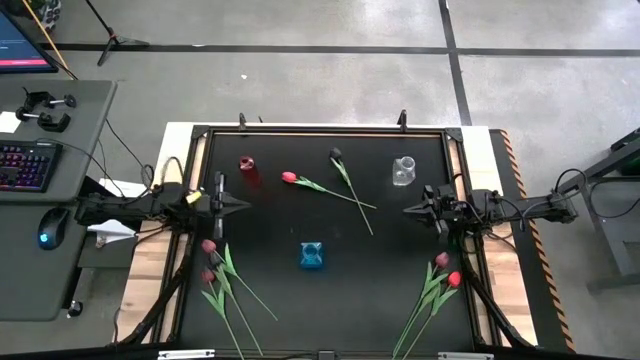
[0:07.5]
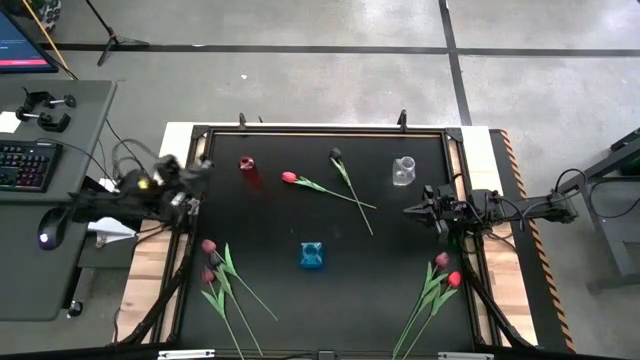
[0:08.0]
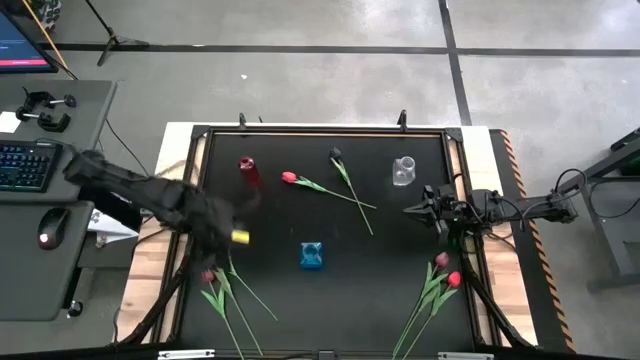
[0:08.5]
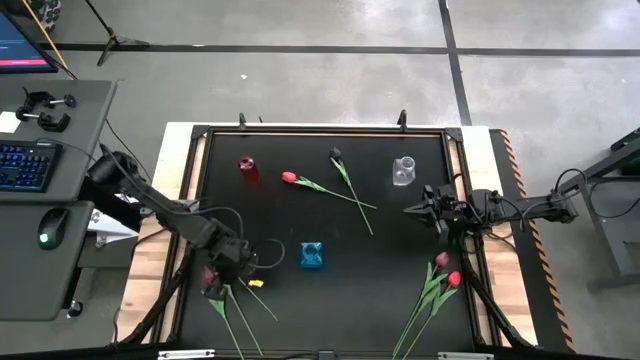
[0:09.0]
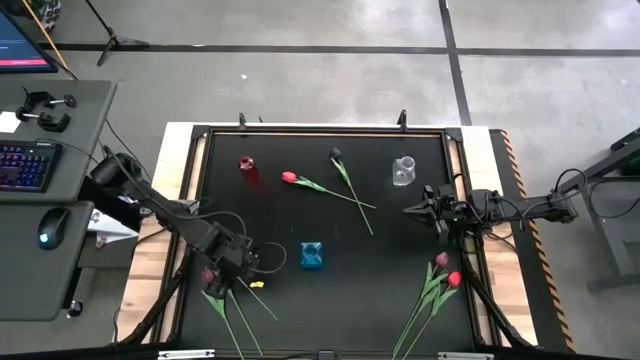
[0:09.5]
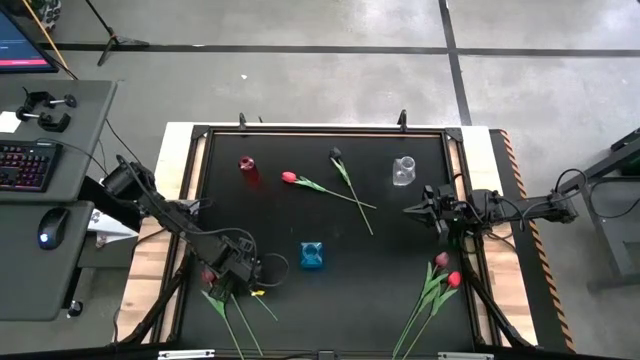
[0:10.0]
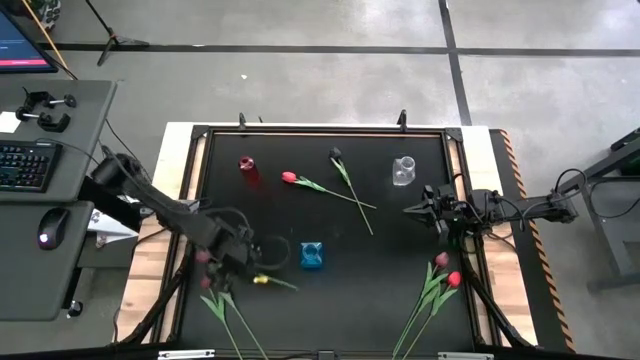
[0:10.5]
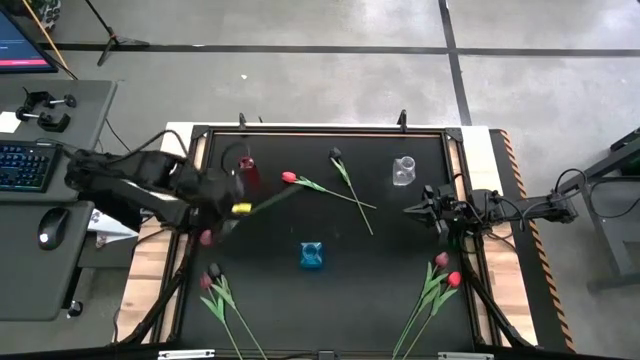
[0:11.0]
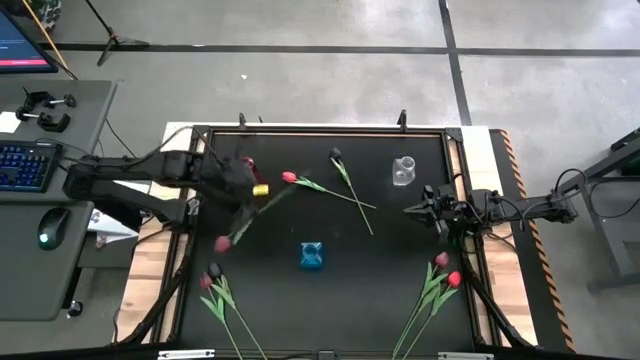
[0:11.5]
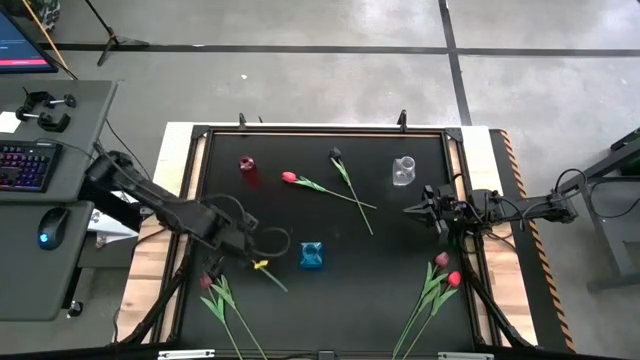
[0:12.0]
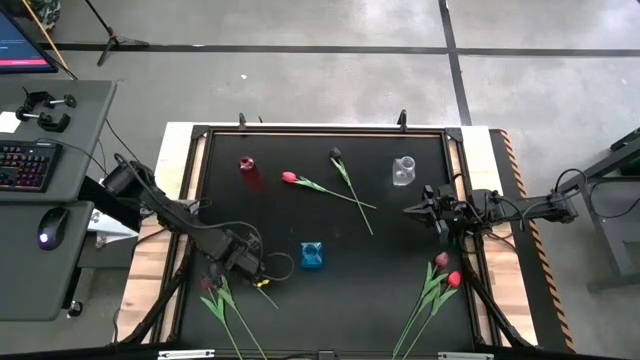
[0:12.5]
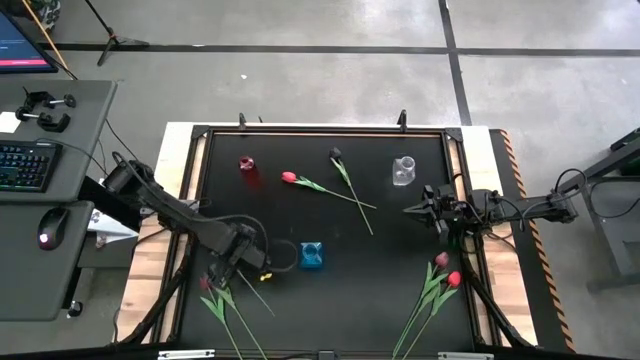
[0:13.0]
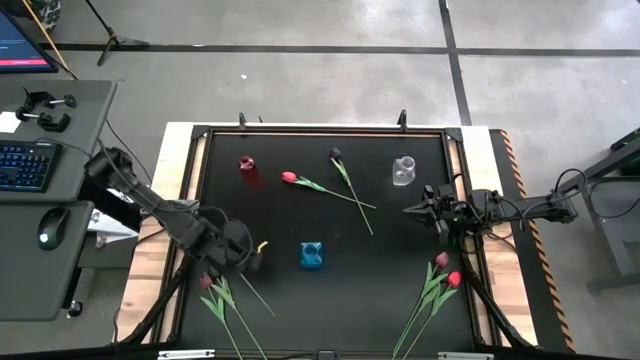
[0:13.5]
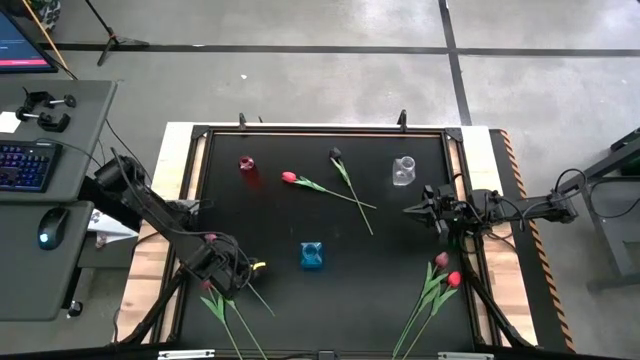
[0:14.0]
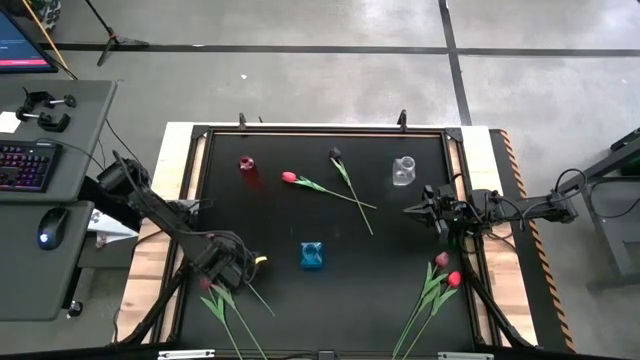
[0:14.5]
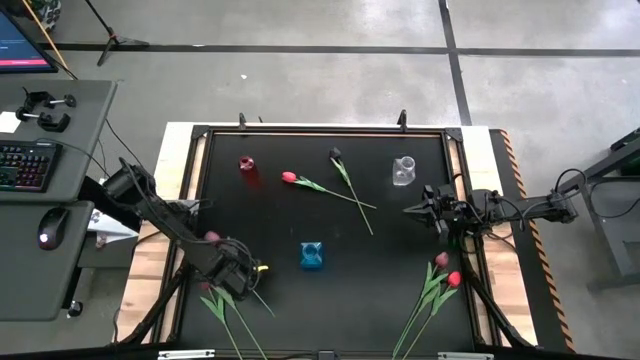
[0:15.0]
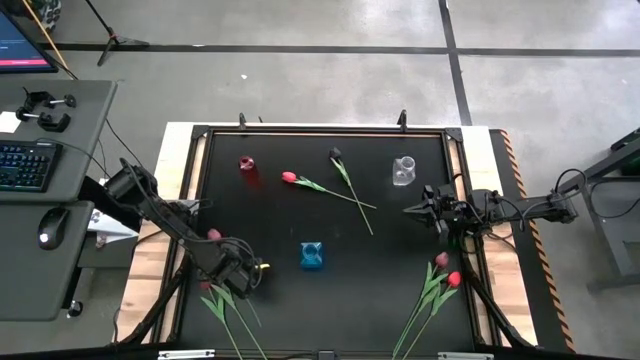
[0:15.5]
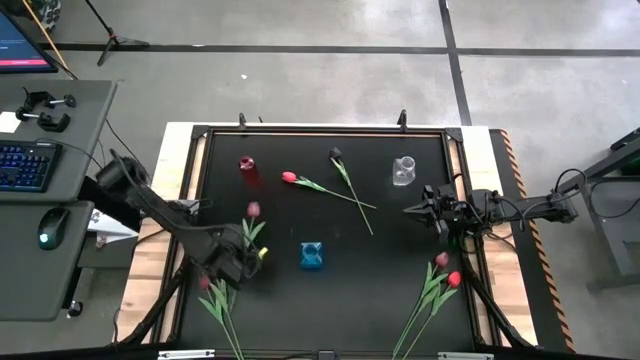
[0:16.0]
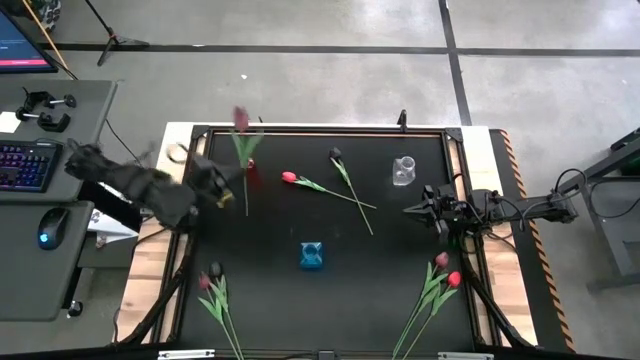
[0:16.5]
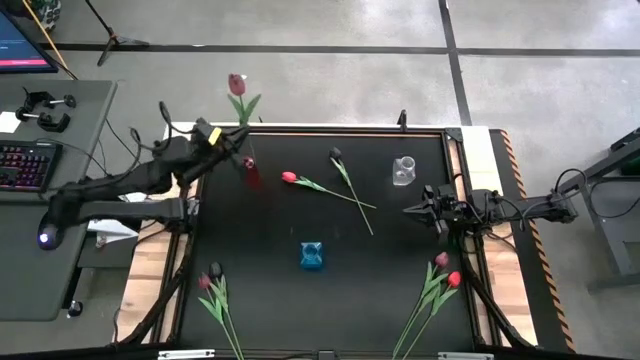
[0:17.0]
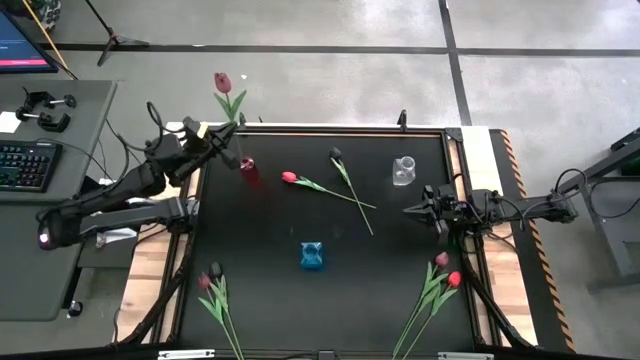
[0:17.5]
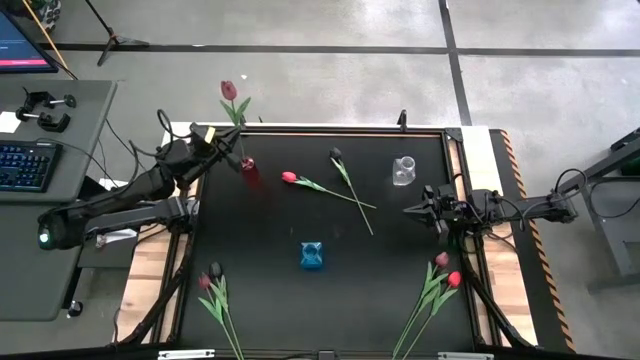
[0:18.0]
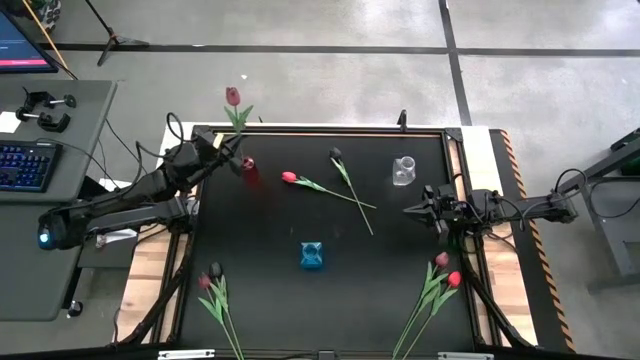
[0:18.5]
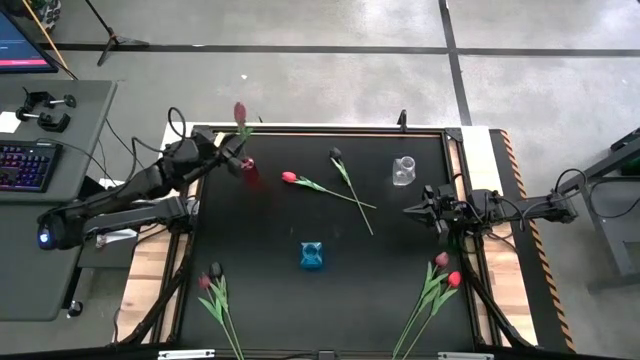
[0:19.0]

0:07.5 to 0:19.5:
Task: Sort flowers into vase by color
Put the top left dark red flower into the red vase

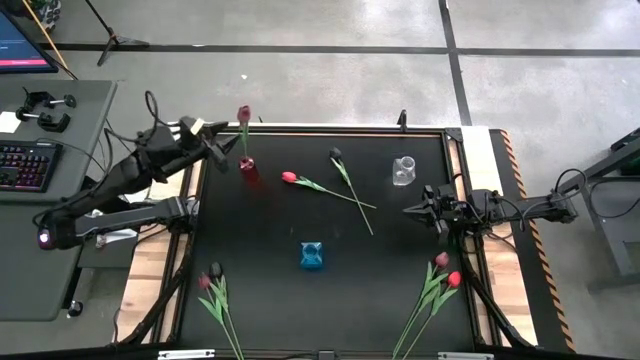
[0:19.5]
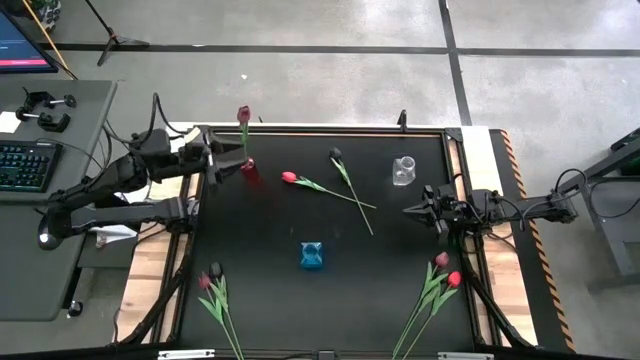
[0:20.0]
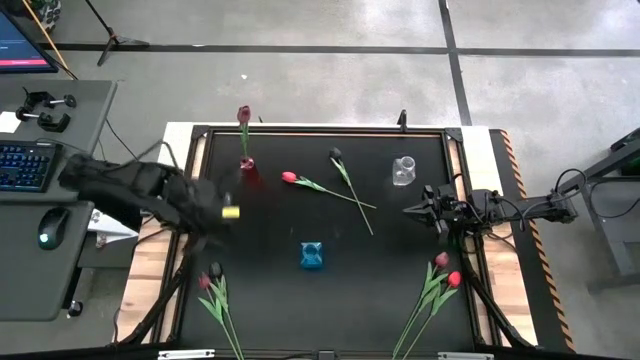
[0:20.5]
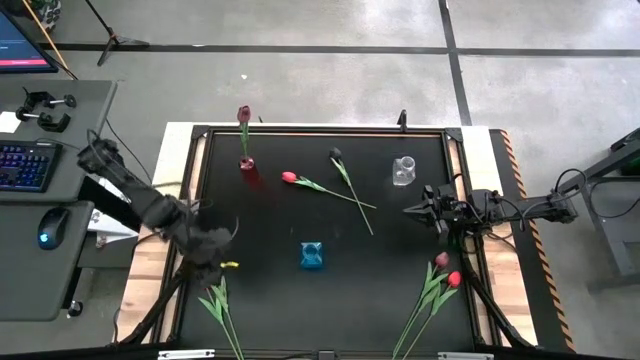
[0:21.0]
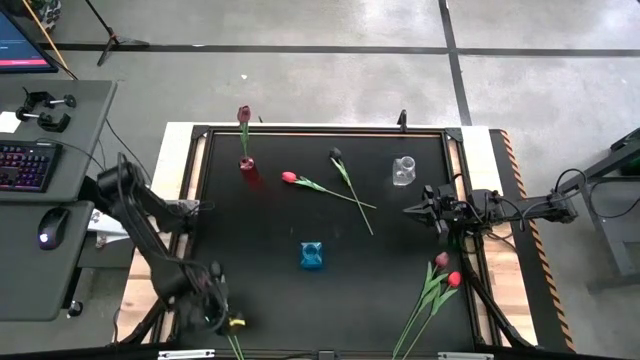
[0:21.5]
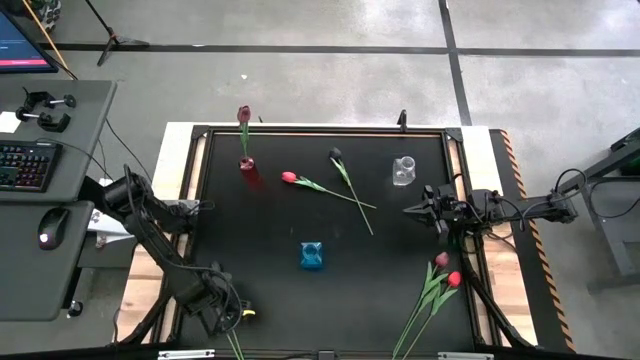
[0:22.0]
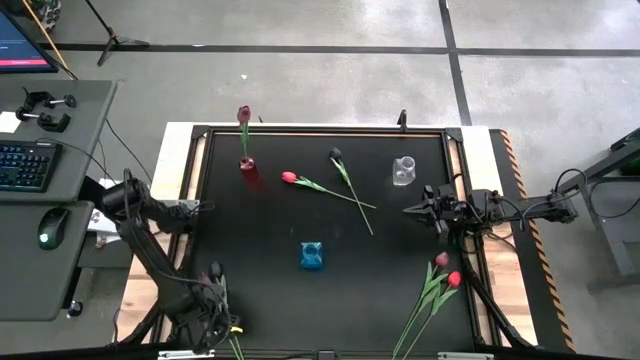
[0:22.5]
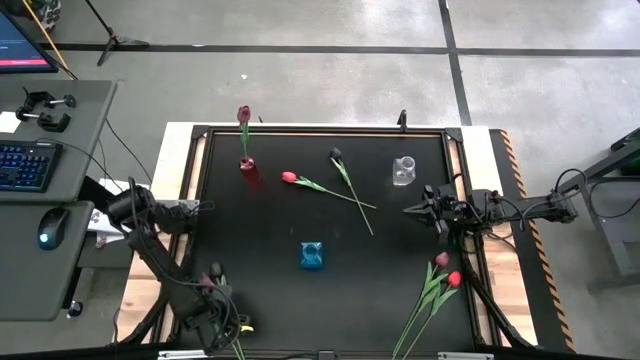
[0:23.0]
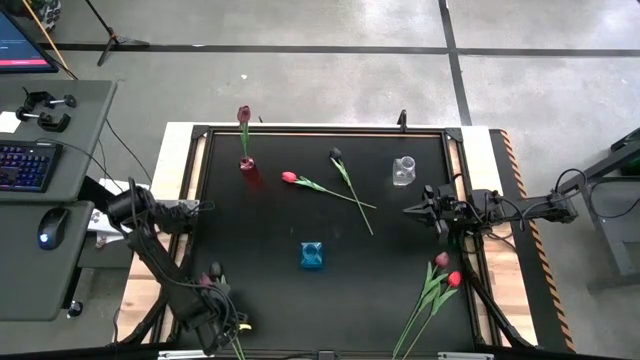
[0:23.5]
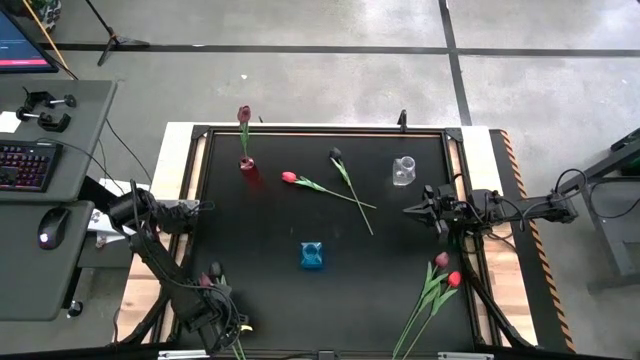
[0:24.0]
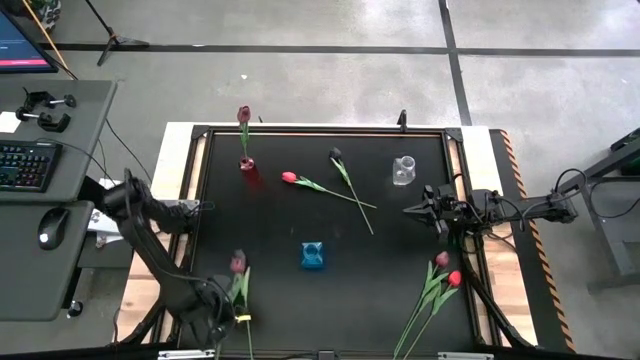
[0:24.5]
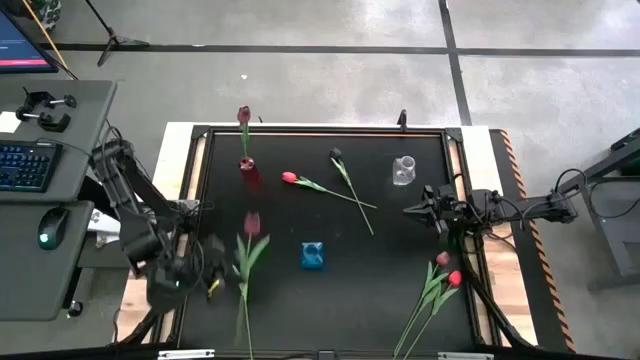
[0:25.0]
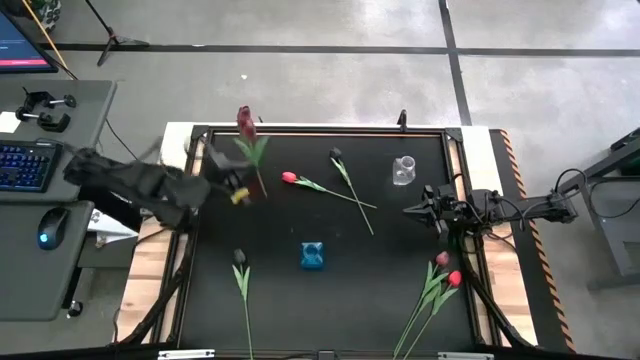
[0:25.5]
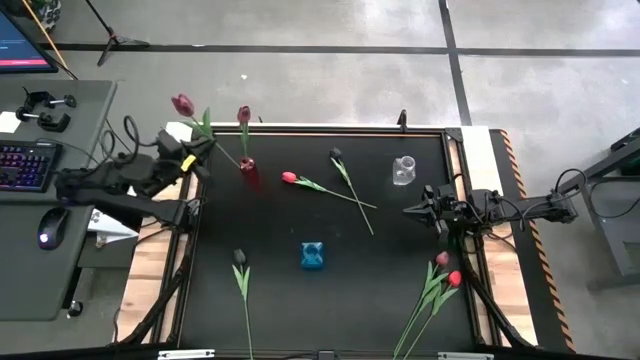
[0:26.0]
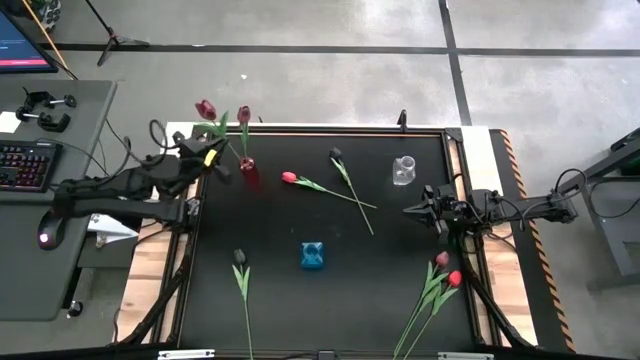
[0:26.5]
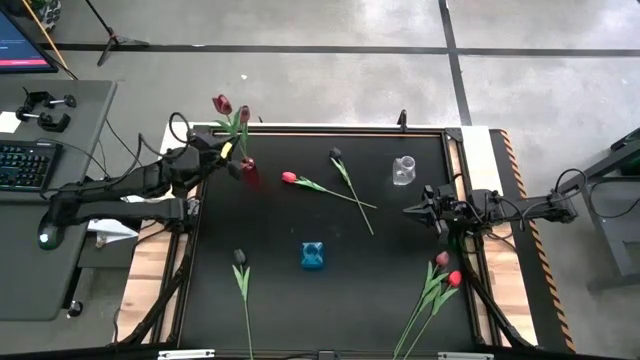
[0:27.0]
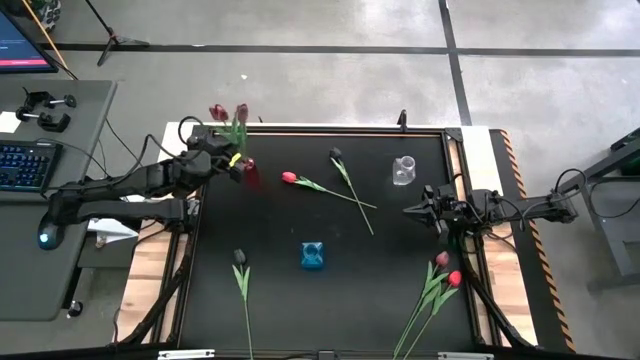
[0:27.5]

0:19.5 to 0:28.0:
Put the left dark red flower into the red vase
